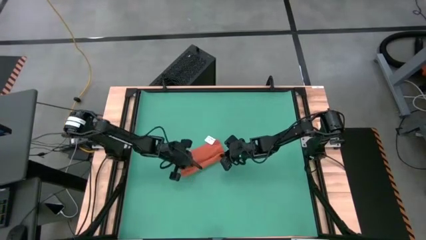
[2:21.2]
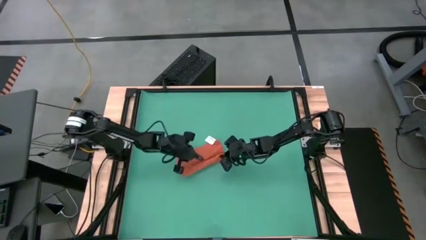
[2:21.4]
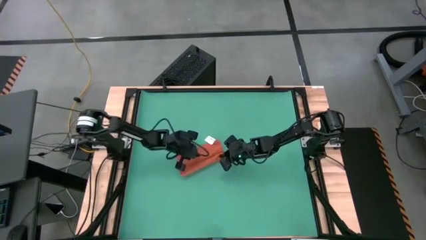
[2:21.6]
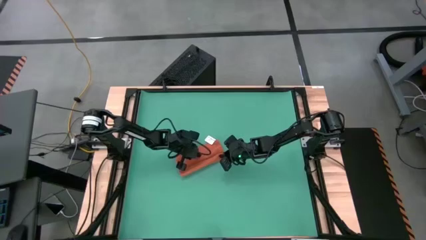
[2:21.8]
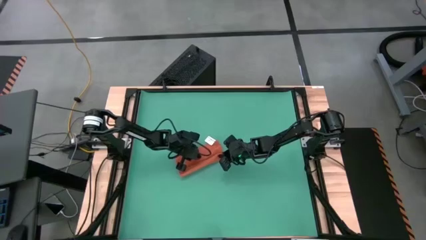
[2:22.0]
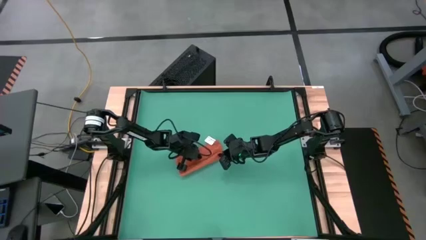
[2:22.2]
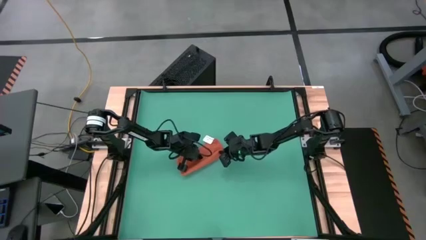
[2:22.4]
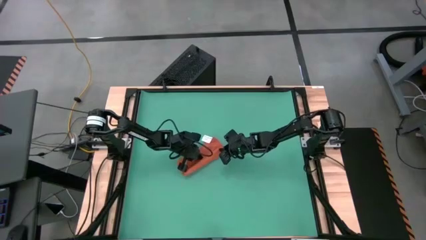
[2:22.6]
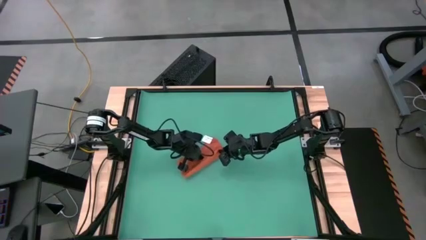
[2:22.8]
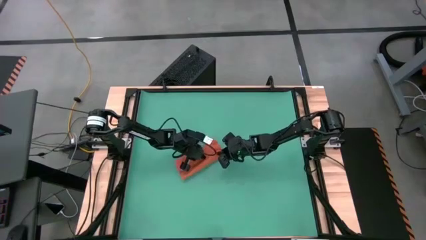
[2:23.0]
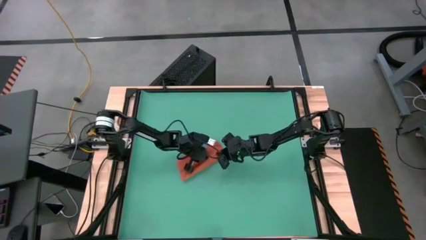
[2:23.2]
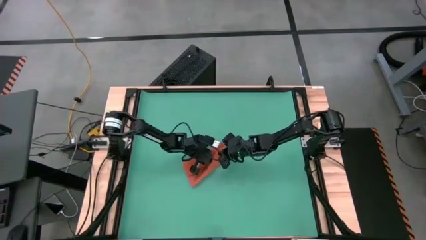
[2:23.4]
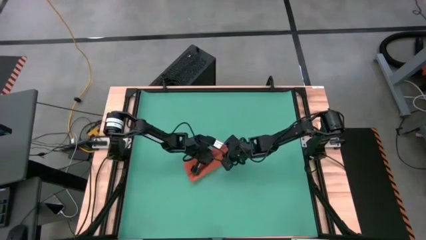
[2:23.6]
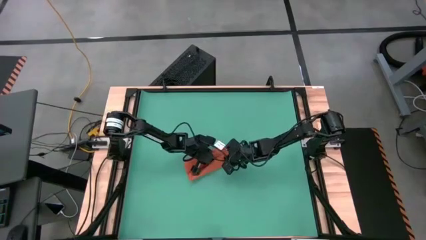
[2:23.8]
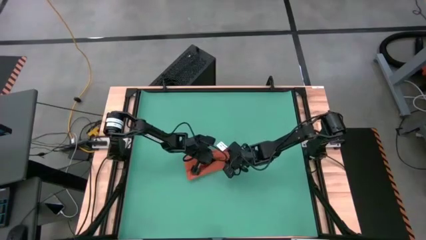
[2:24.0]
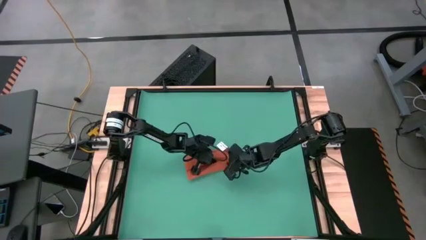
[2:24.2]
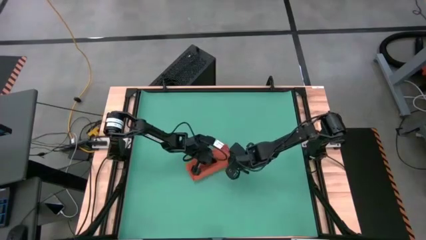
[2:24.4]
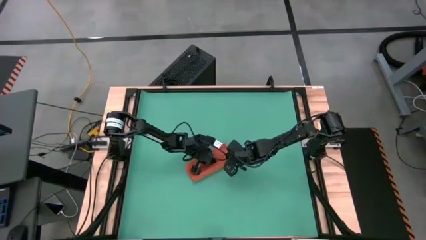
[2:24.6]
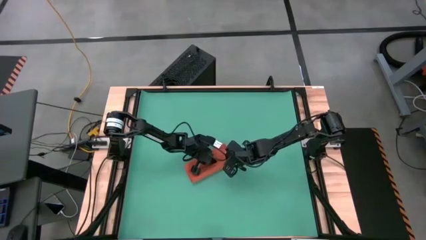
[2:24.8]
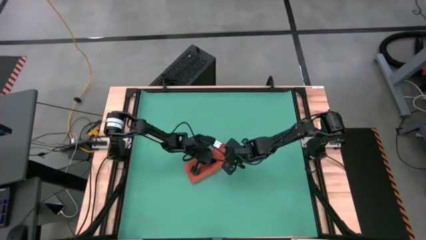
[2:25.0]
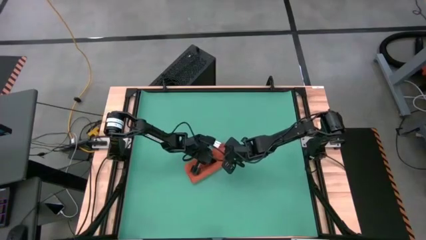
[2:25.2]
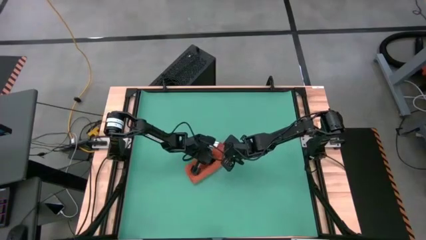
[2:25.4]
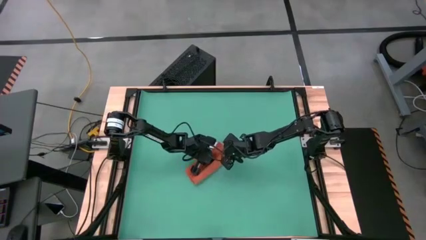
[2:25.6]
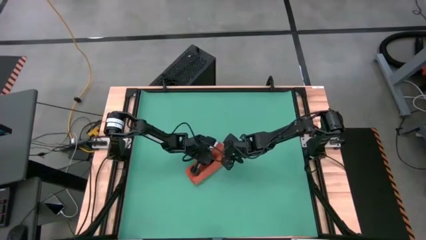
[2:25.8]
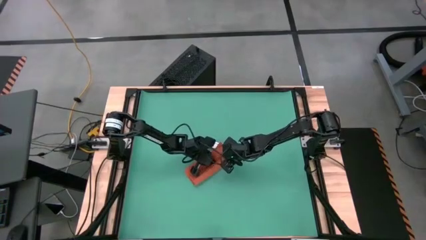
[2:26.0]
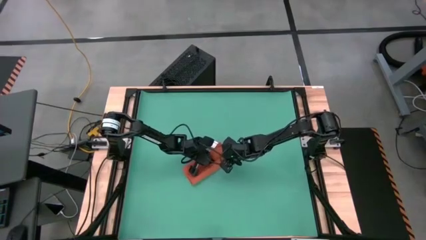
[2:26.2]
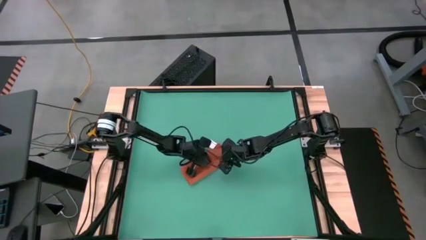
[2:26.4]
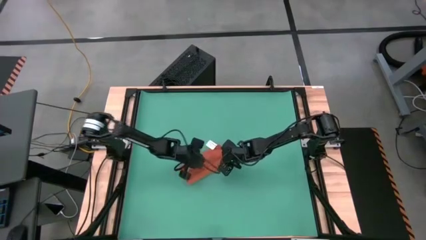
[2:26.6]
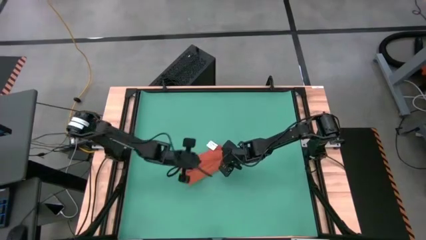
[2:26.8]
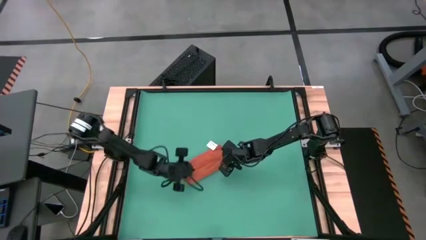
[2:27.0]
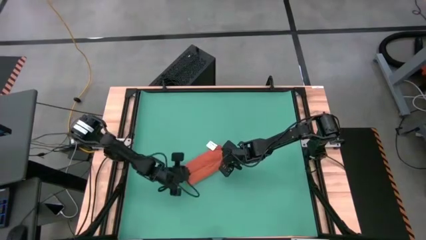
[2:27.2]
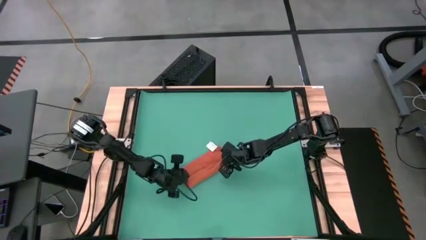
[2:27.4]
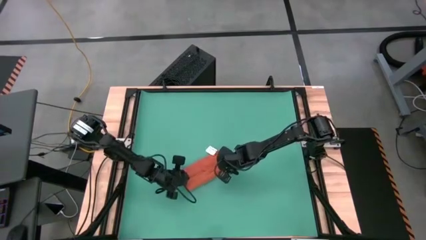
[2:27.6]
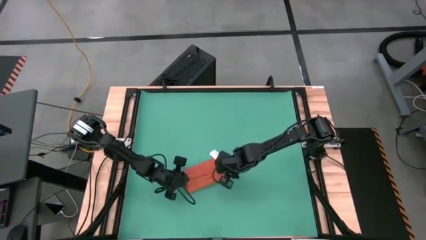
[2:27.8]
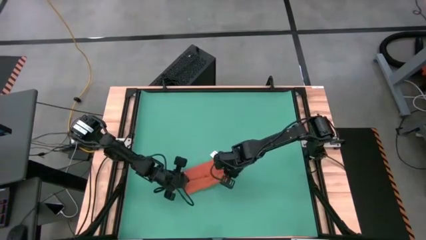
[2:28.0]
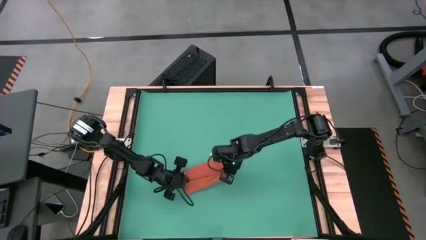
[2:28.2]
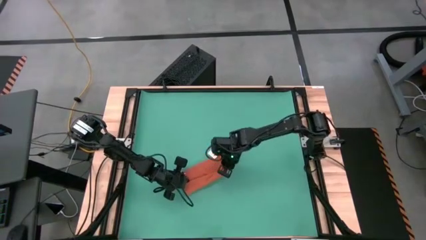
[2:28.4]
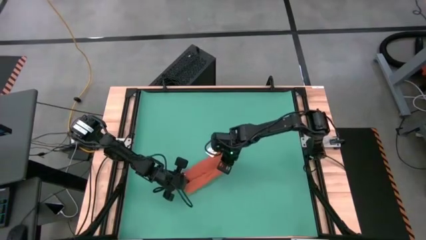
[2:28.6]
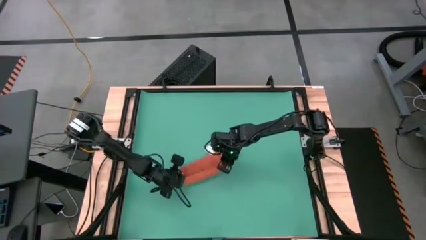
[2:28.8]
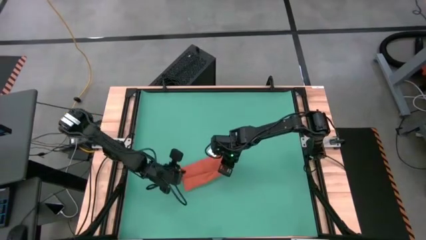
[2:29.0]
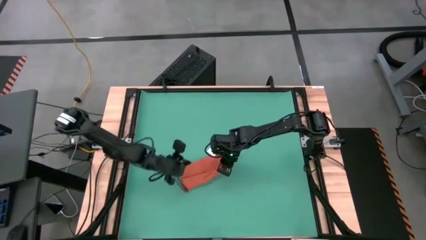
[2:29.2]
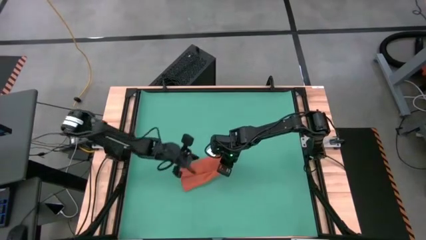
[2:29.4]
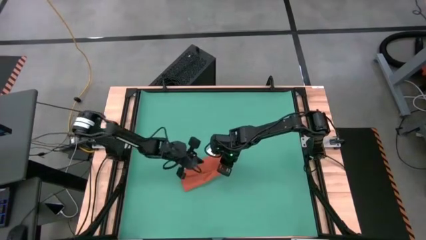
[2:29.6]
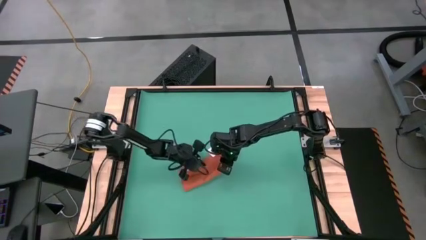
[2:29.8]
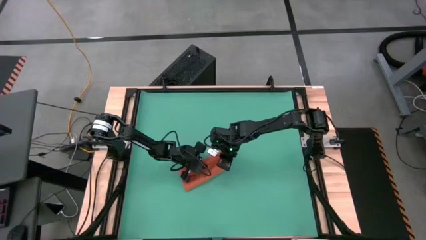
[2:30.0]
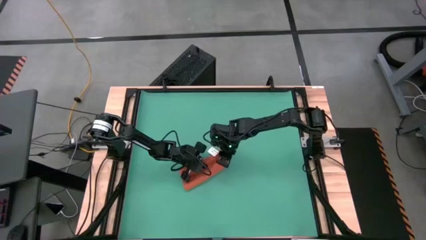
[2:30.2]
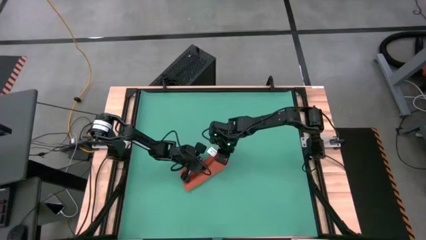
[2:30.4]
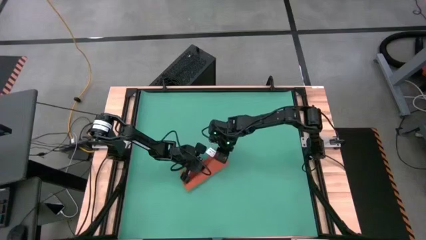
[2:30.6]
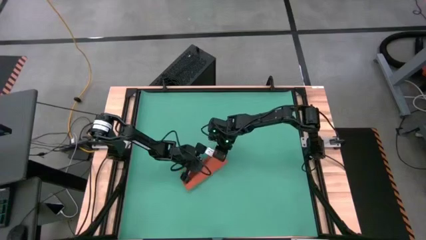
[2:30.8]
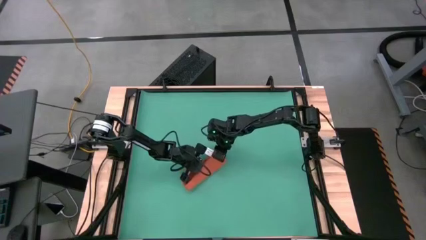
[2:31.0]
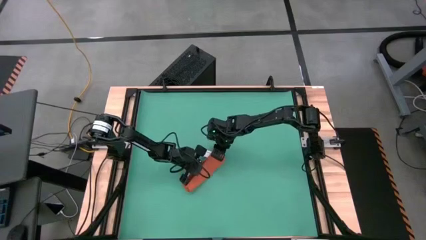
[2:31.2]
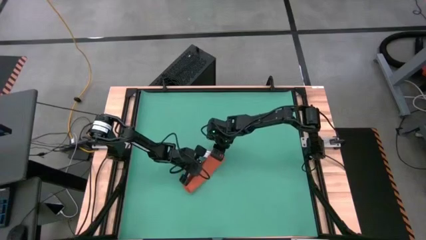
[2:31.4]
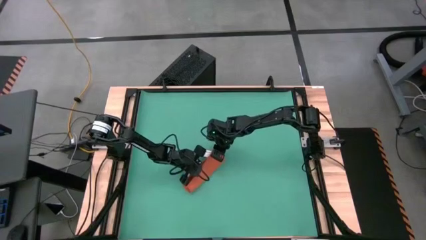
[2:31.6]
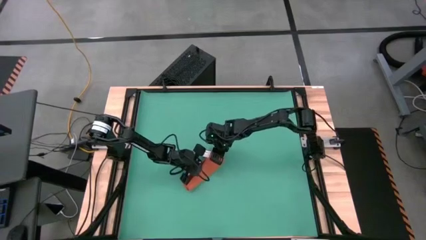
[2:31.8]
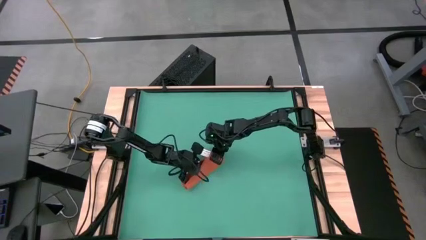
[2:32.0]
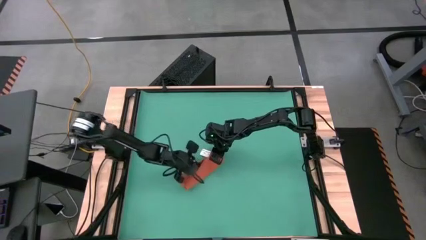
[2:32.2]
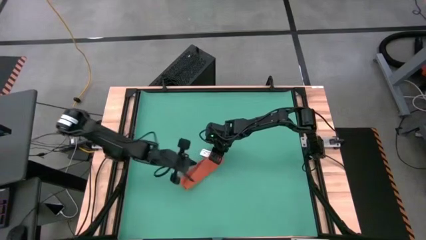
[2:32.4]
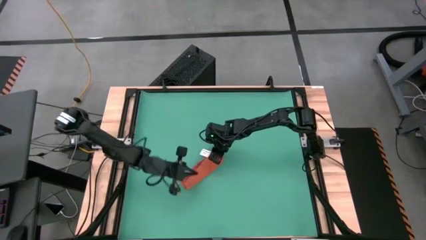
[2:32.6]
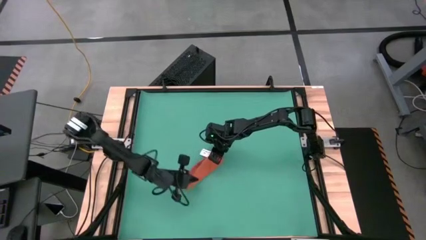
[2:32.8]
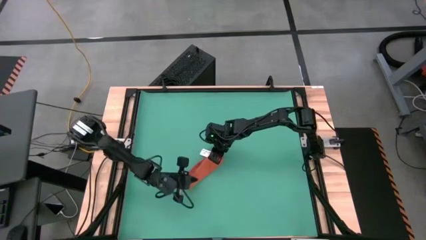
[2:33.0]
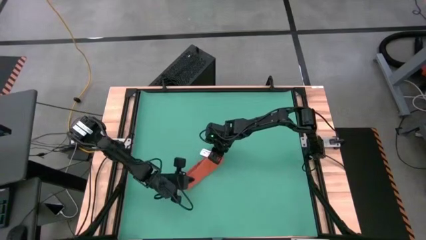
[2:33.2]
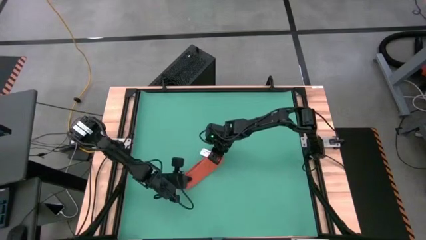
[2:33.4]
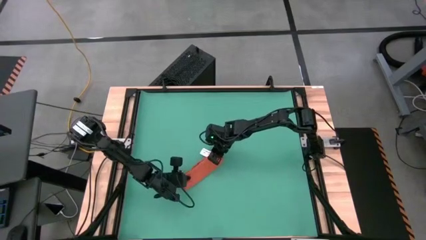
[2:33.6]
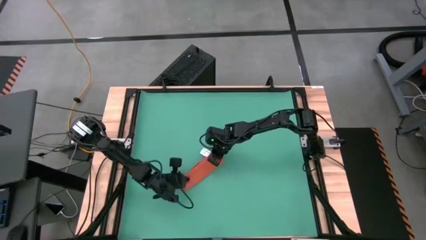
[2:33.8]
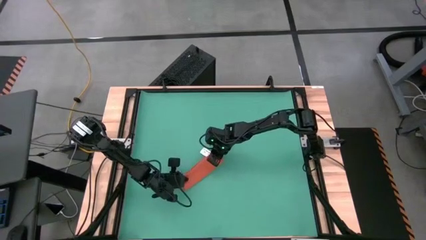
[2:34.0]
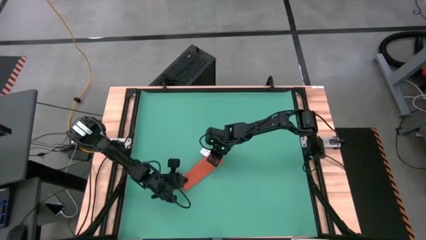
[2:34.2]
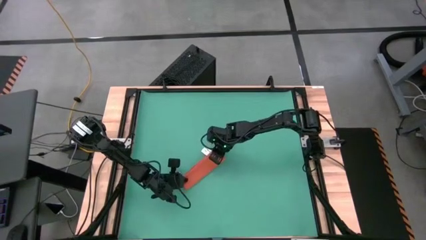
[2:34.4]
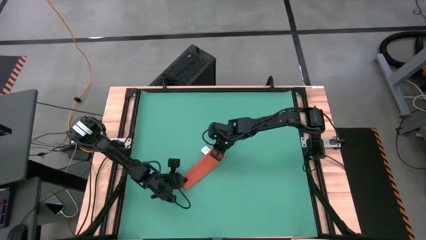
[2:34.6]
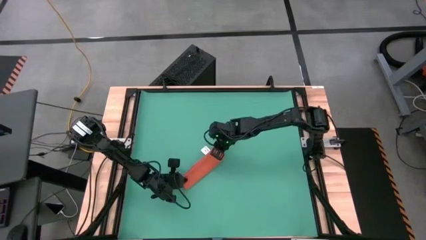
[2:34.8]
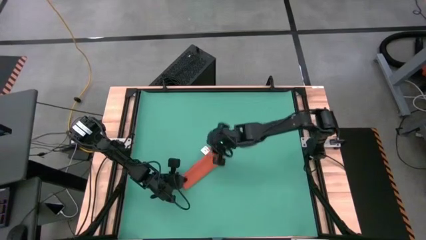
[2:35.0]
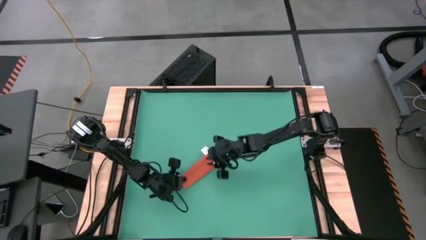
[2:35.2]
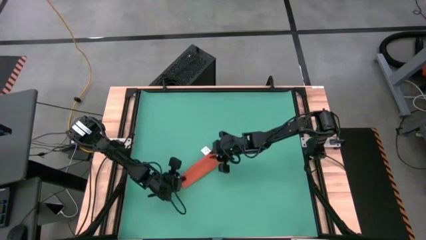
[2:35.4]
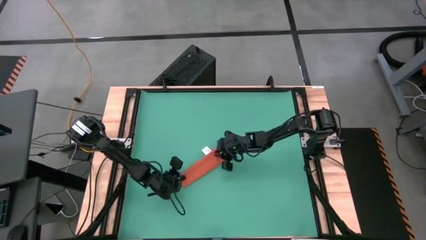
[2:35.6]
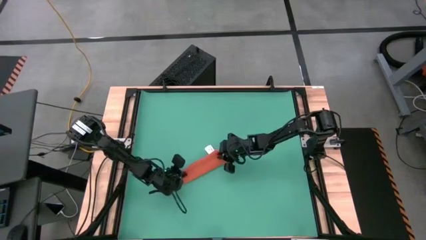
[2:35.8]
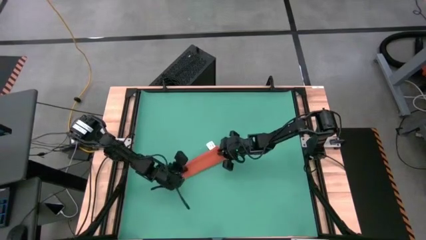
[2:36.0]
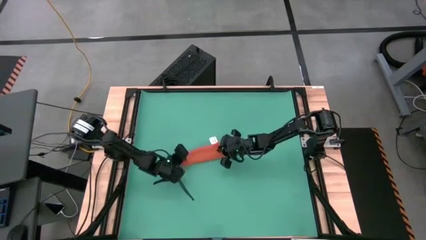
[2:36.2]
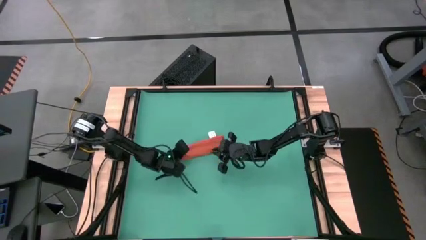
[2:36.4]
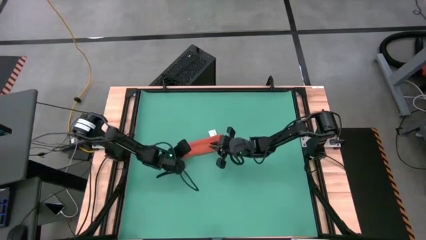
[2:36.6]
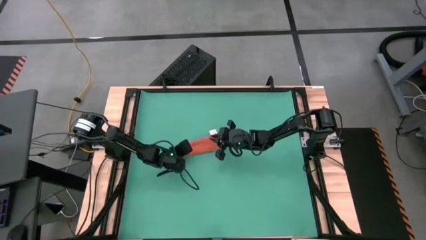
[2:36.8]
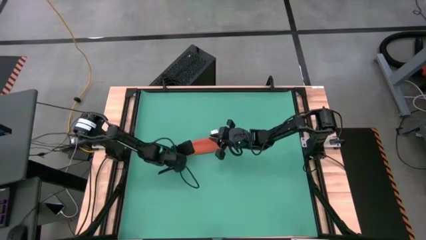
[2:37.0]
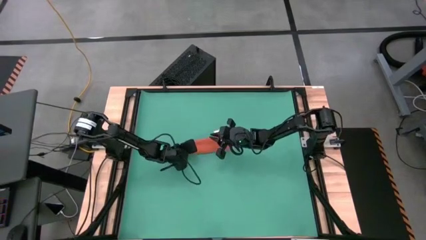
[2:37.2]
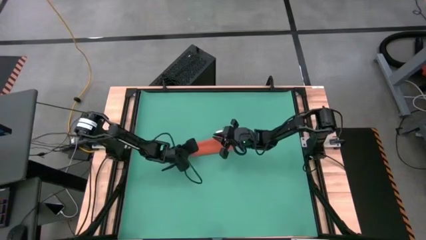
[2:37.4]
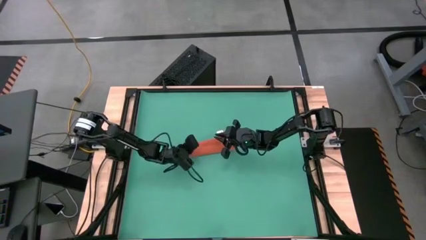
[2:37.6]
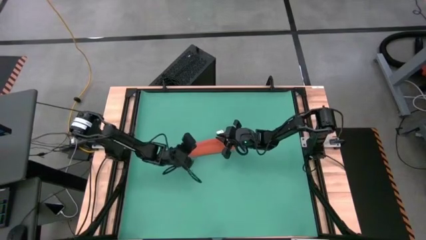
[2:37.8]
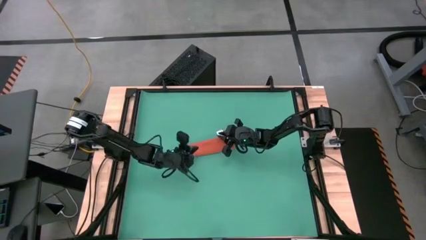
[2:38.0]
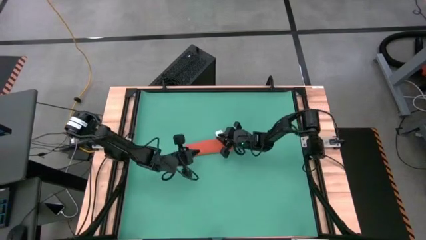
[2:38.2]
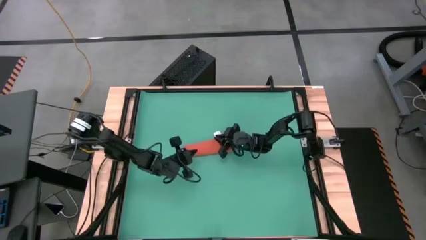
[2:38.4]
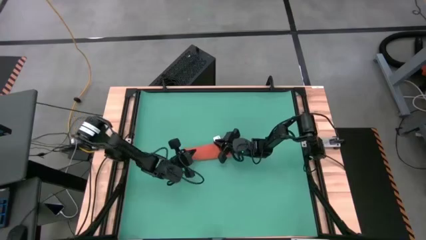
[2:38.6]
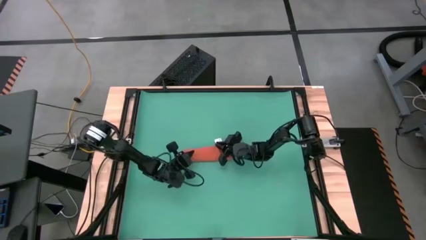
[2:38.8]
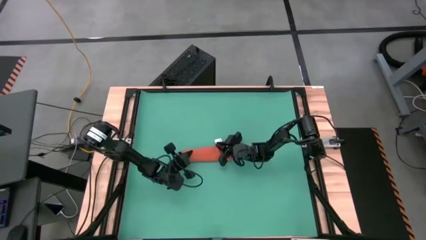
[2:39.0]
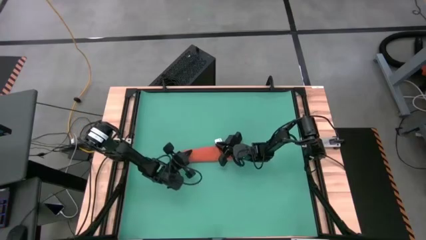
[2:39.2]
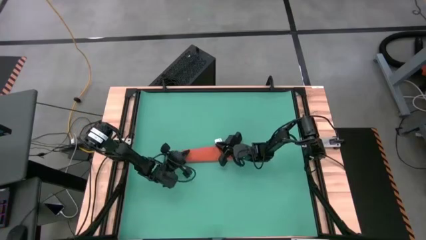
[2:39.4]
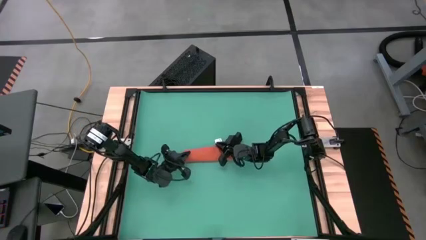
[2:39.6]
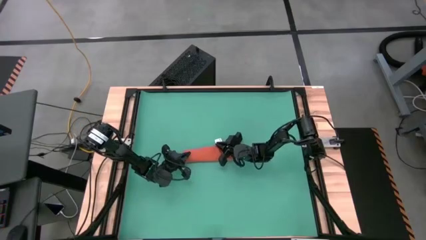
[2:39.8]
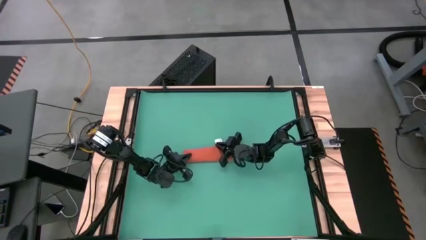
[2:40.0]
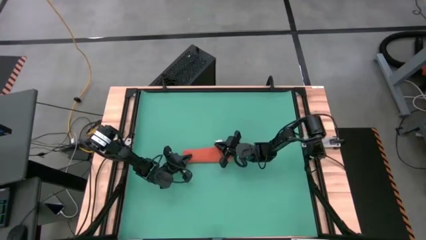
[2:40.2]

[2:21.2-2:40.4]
Task: Roll napkin
Roll the orange table napkin
